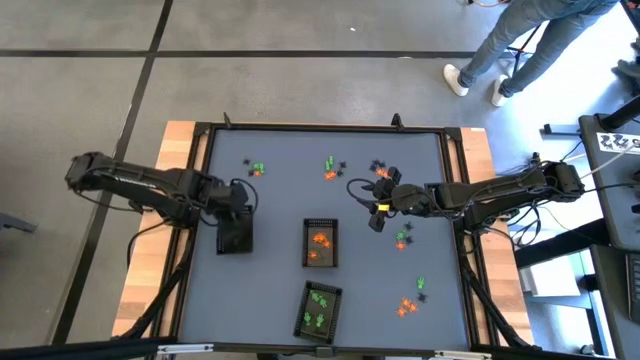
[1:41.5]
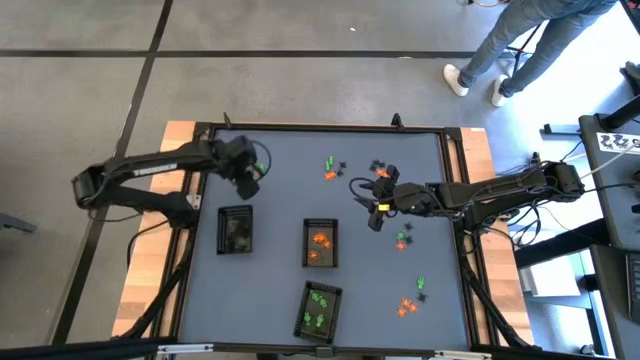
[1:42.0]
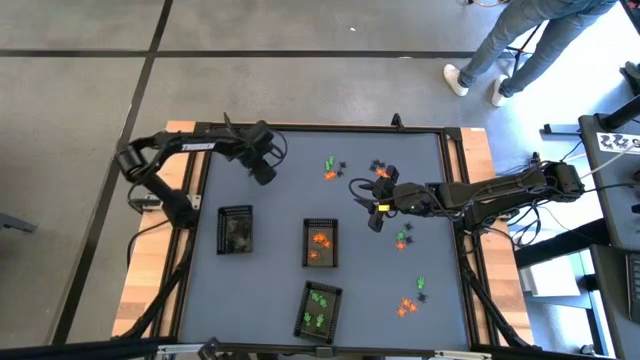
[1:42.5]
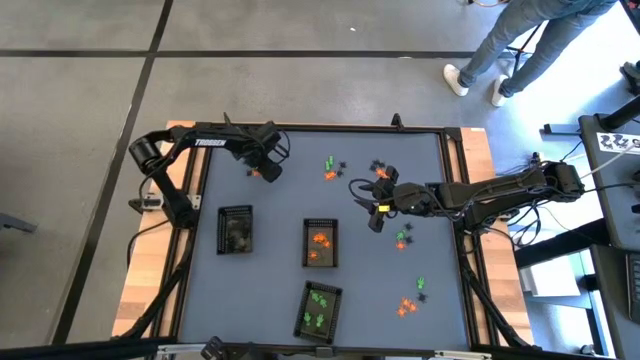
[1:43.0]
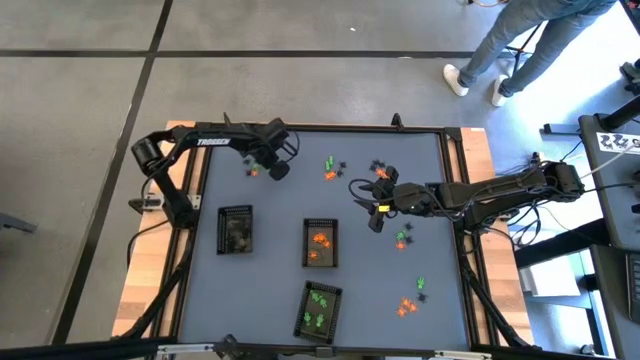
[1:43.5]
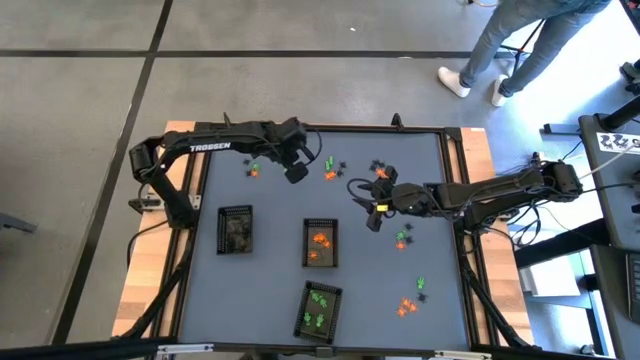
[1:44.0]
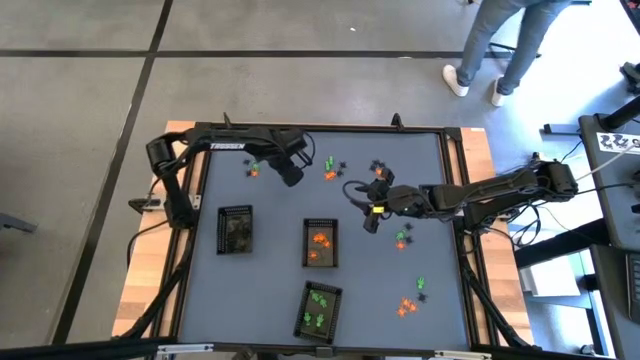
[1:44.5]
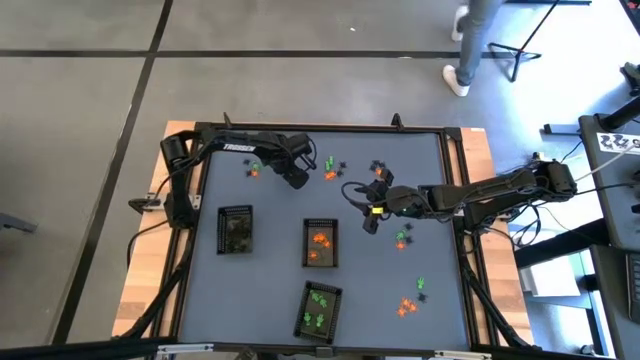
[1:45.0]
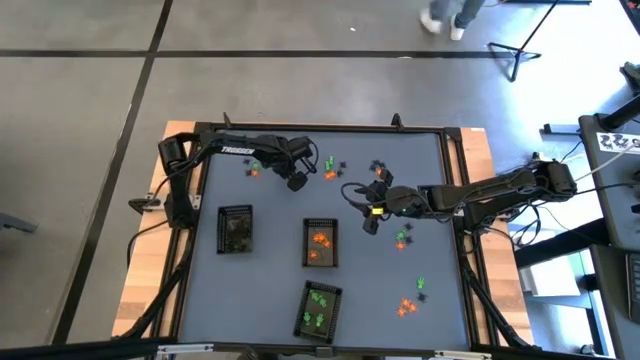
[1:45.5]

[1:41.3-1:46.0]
Task: Sort Halloween decoration
Put the green toy skeleton into the bottom black basket

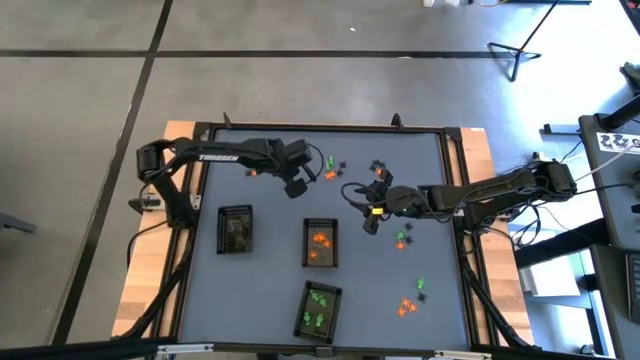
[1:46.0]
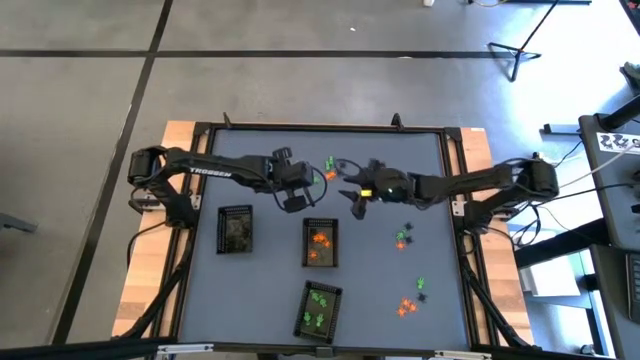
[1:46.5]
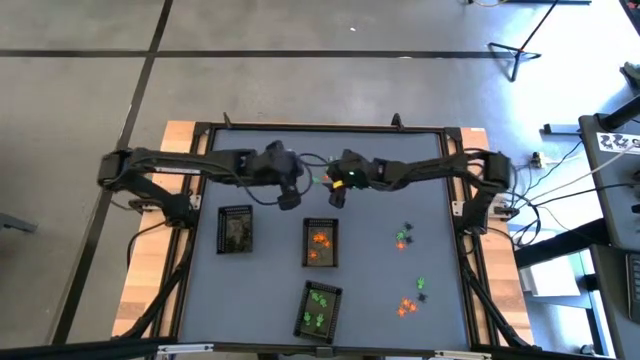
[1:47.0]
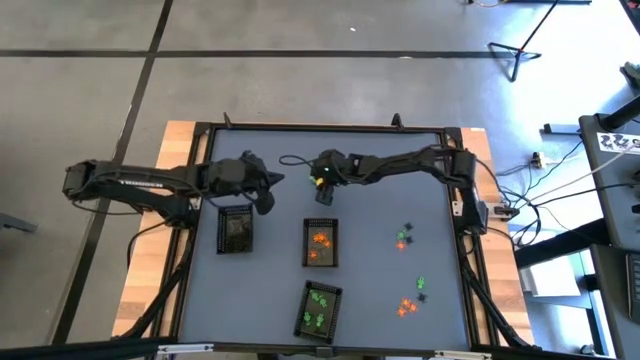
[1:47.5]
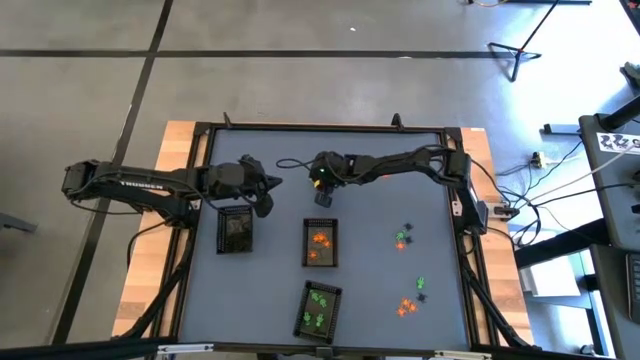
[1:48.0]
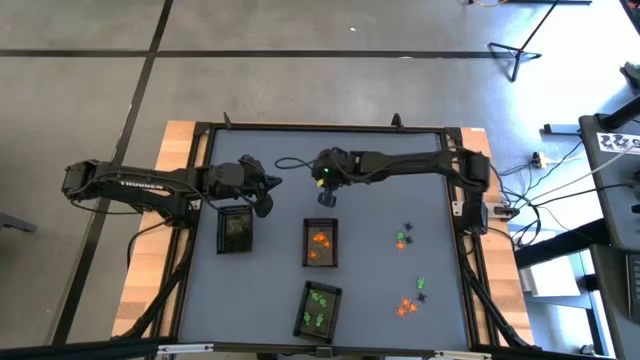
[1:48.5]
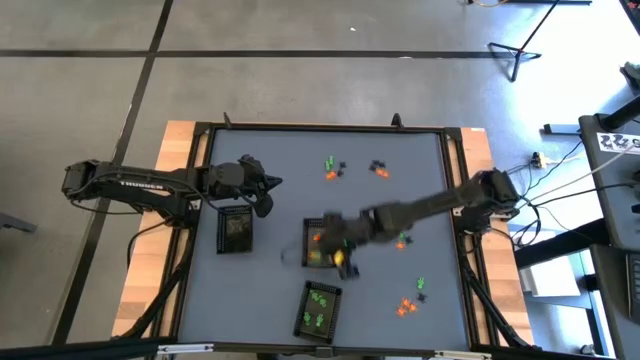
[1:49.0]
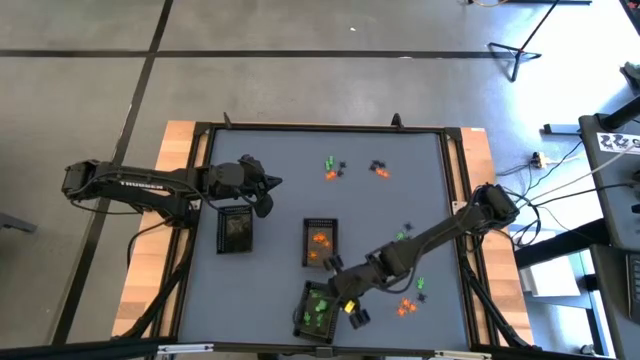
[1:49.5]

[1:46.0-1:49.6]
Put the green toy skeleton into the bottom black basket

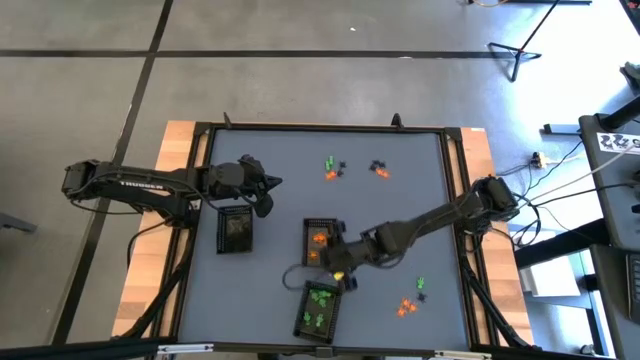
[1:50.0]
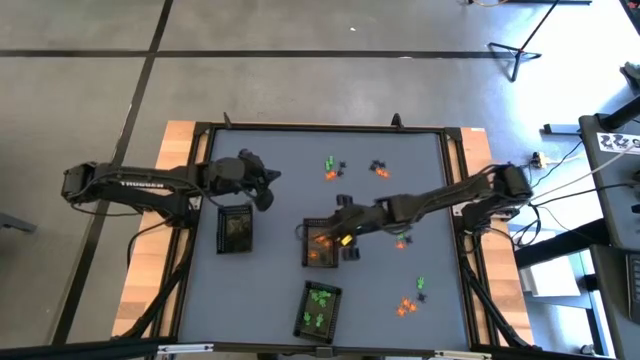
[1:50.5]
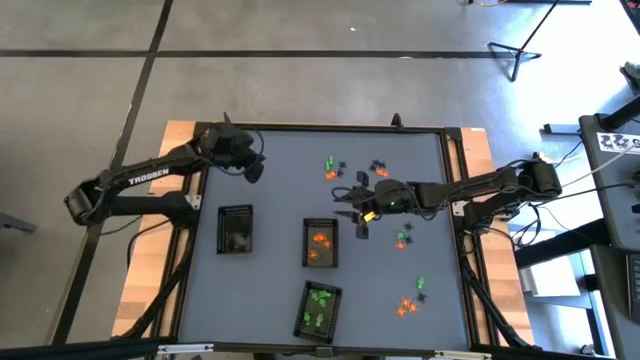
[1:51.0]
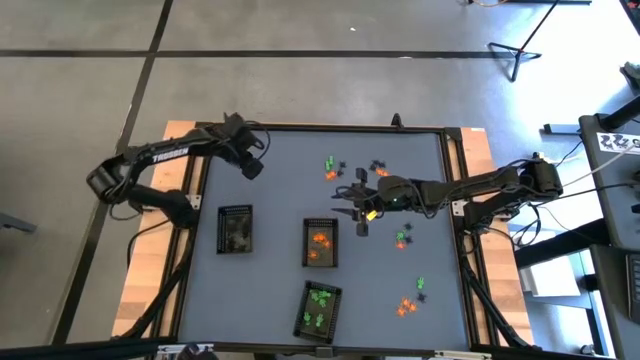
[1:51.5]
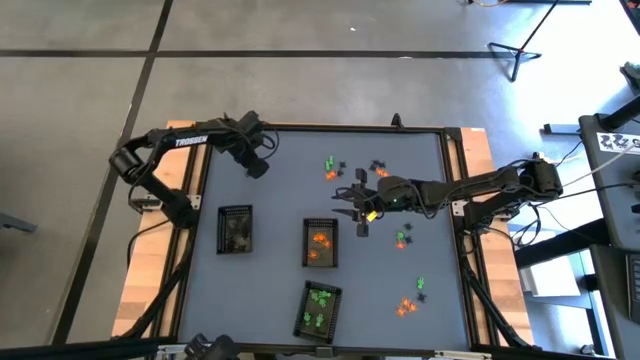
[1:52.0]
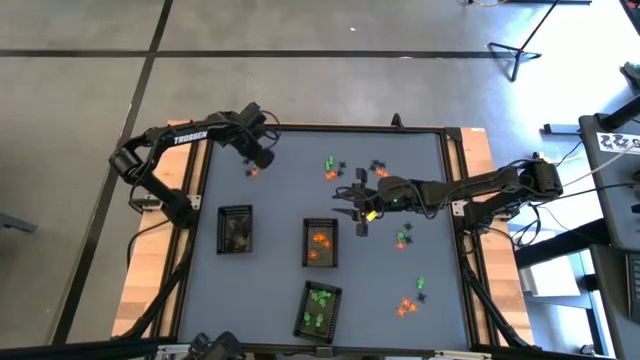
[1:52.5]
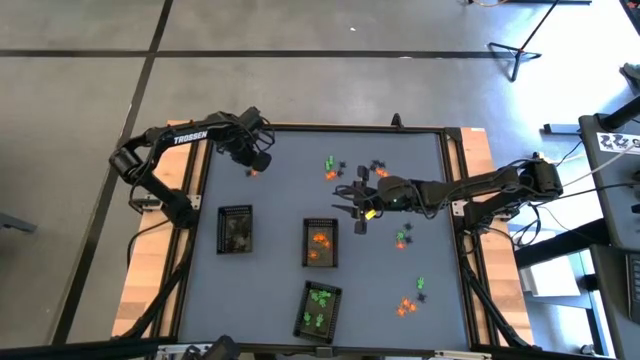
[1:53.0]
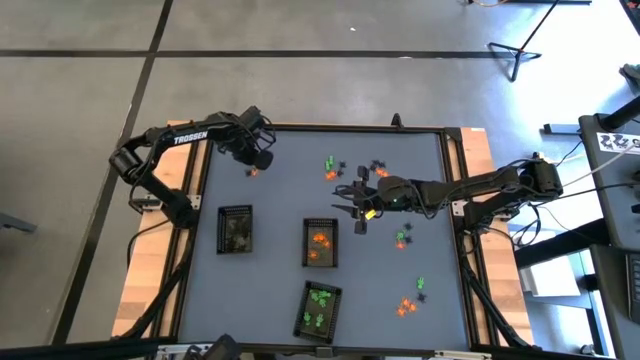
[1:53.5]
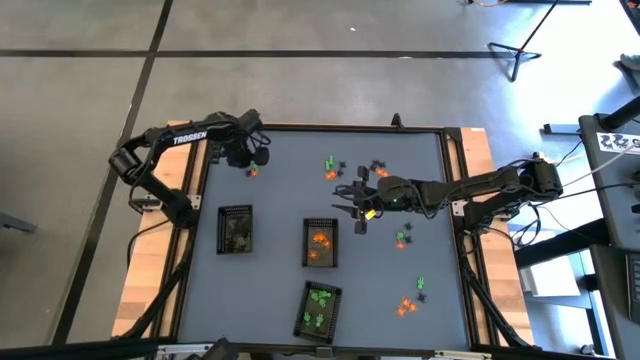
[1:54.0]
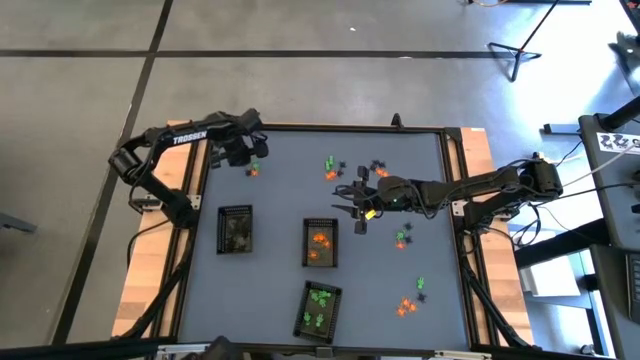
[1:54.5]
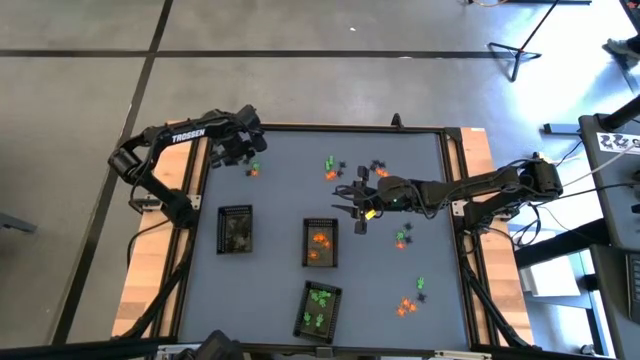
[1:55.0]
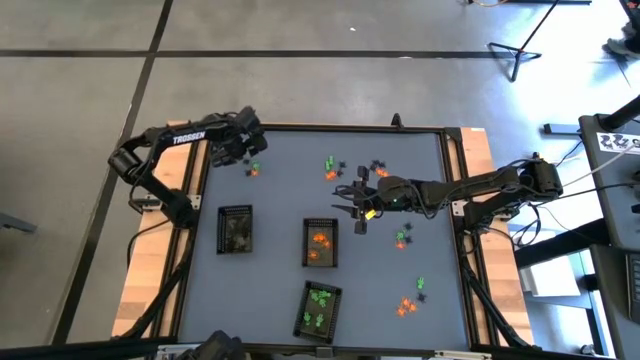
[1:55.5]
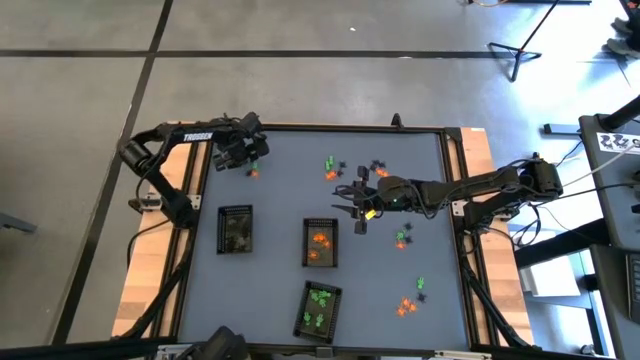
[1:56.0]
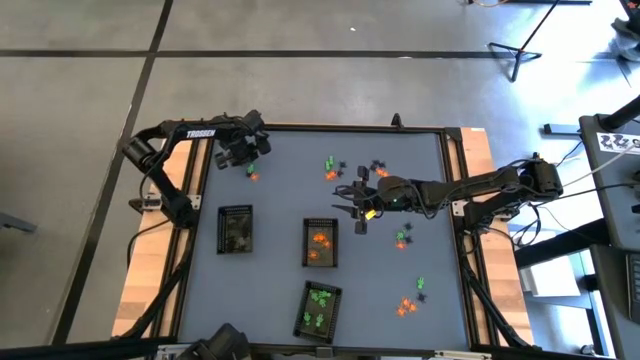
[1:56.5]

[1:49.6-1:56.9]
Put the black spider toy into the top left black basket

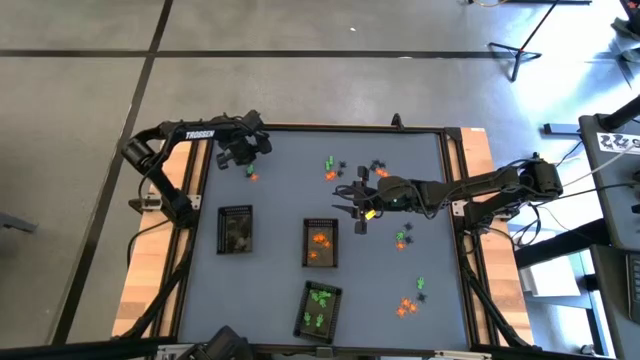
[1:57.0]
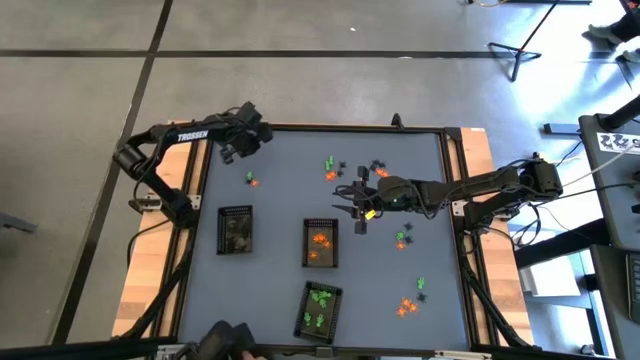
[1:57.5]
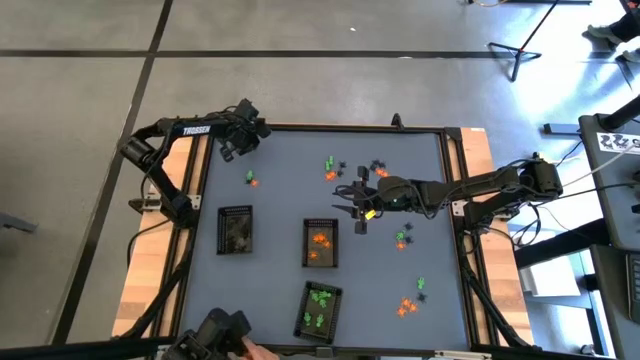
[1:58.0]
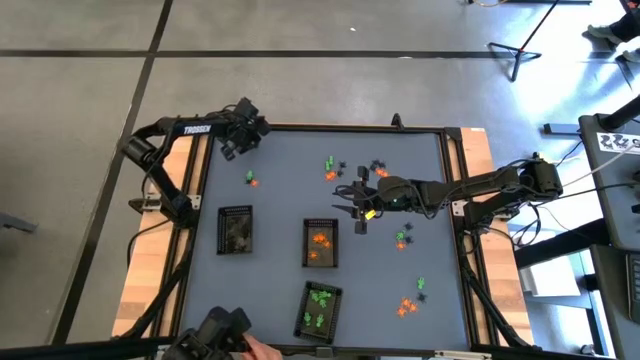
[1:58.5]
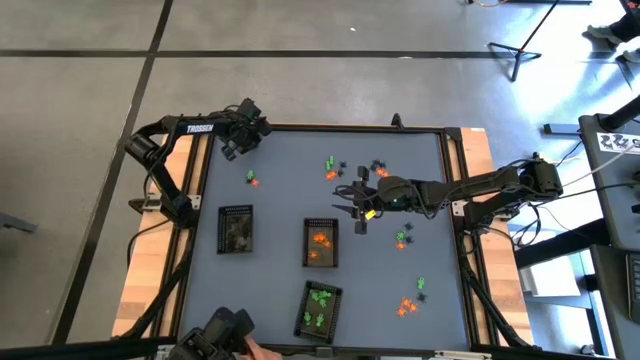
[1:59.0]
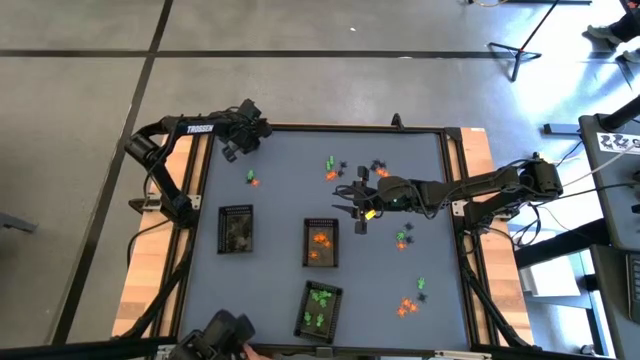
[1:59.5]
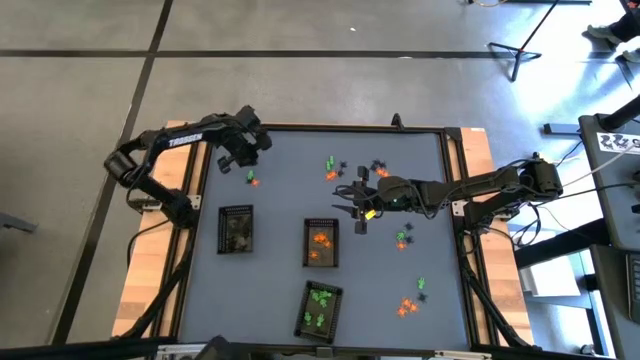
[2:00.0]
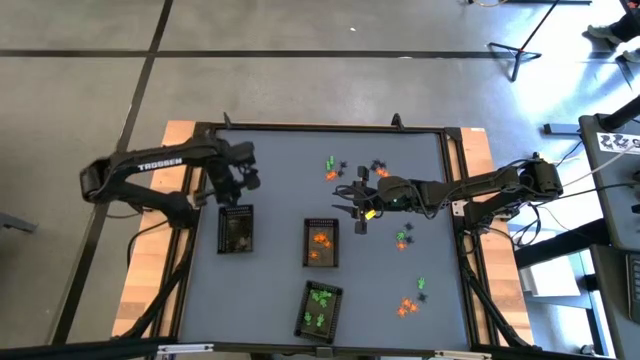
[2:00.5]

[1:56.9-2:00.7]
Put the black spider toy into the top left black basket

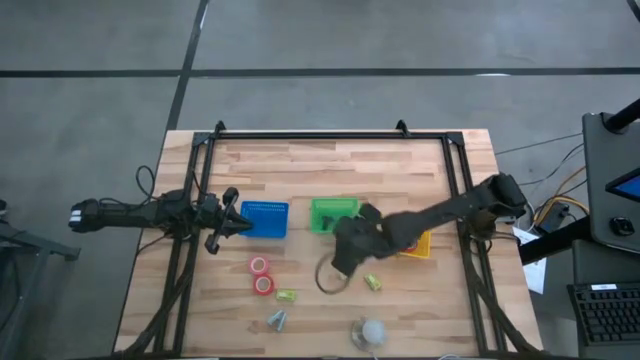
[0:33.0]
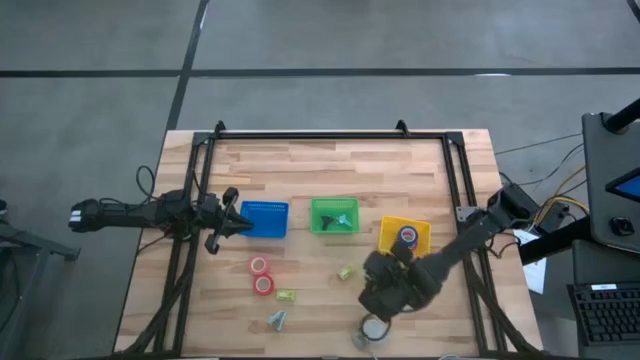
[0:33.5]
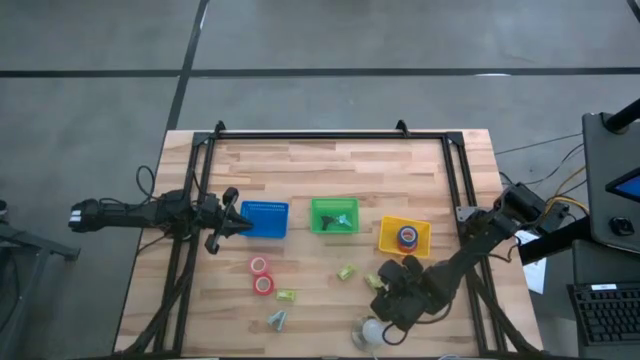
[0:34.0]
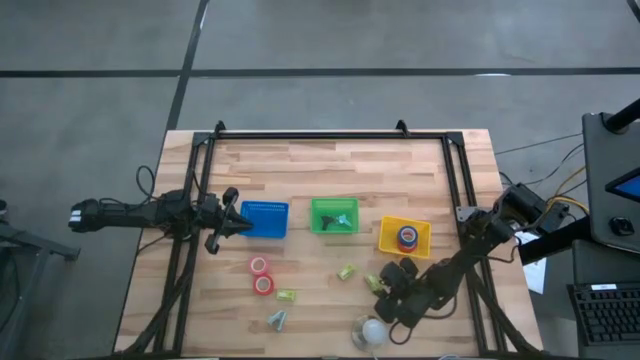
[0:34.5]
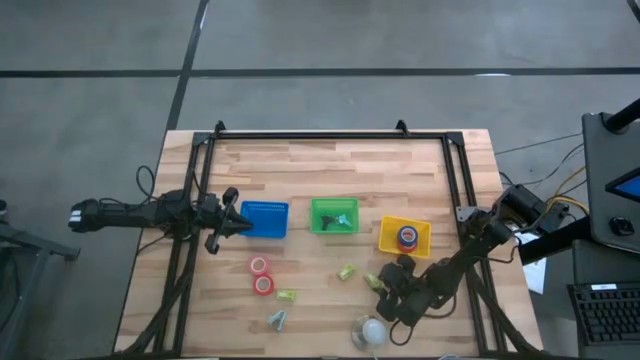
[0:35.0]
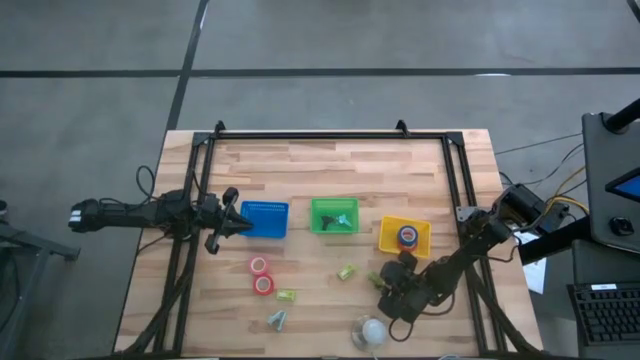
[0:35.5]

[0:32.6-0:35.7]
Task: Pick and place Stapler, Stapler remover, tape
Put the right staple pin box into the blue bin
